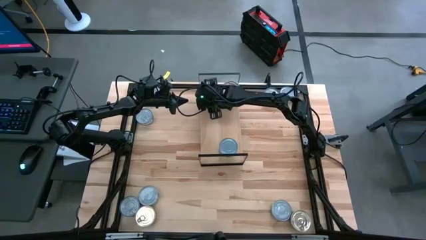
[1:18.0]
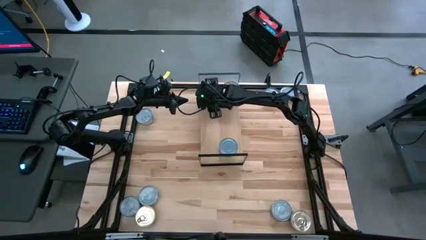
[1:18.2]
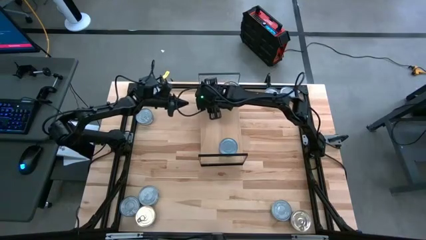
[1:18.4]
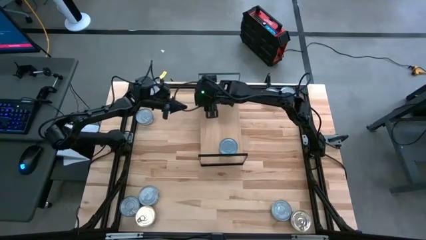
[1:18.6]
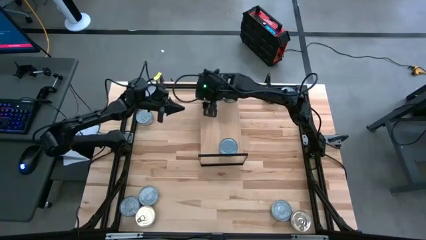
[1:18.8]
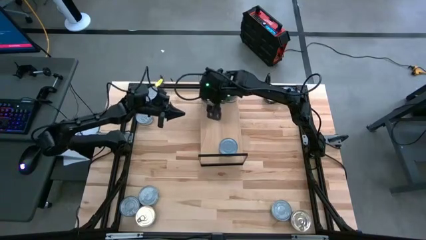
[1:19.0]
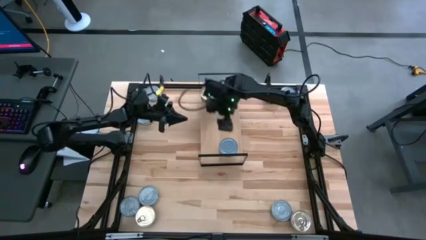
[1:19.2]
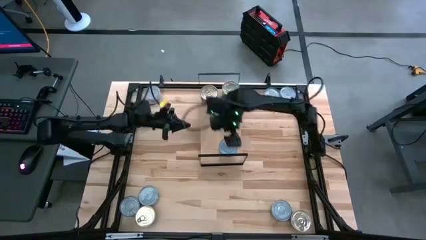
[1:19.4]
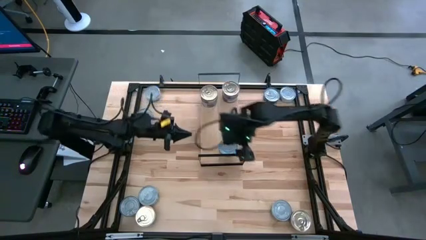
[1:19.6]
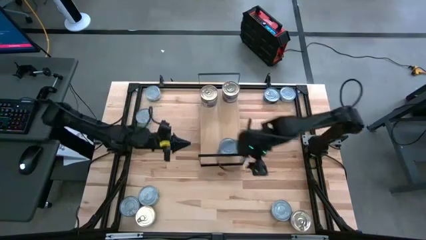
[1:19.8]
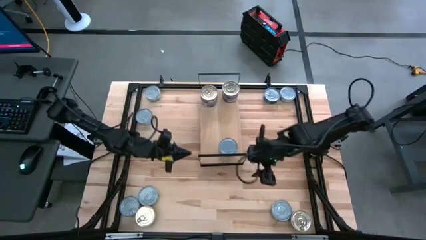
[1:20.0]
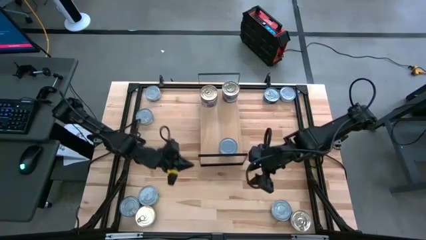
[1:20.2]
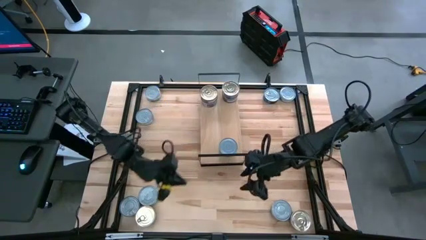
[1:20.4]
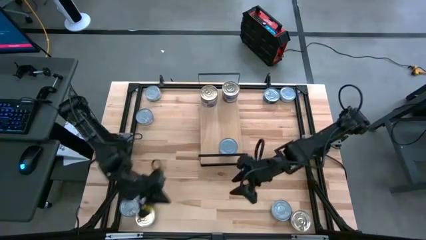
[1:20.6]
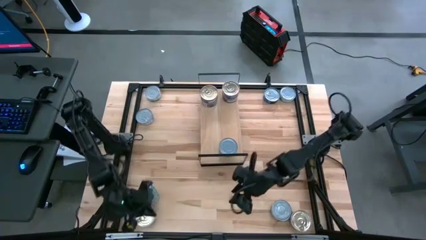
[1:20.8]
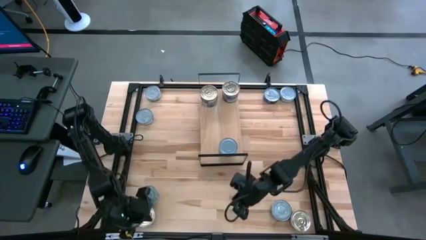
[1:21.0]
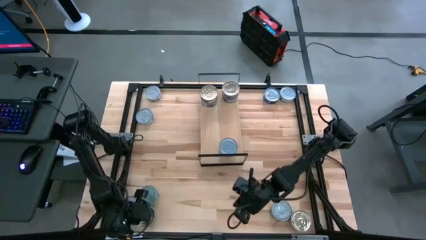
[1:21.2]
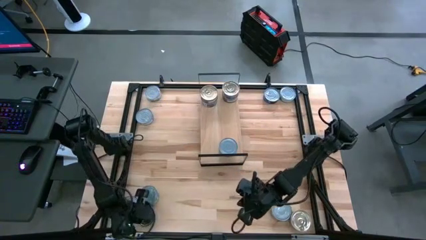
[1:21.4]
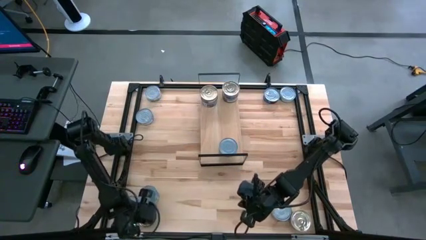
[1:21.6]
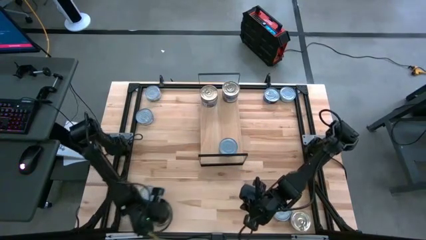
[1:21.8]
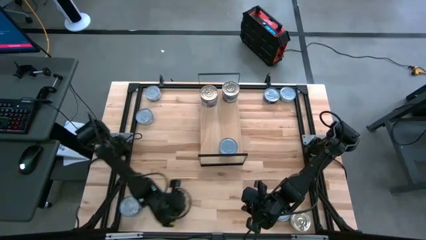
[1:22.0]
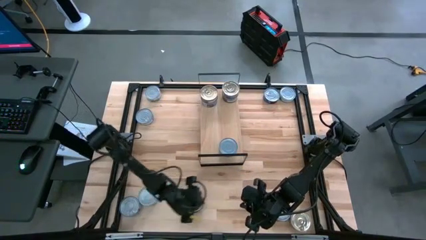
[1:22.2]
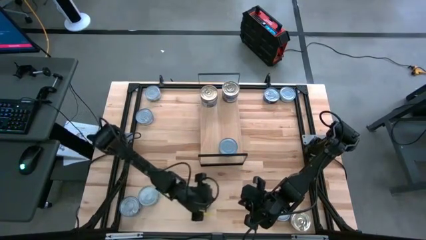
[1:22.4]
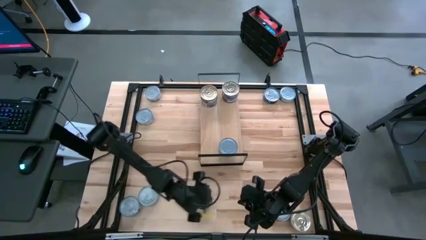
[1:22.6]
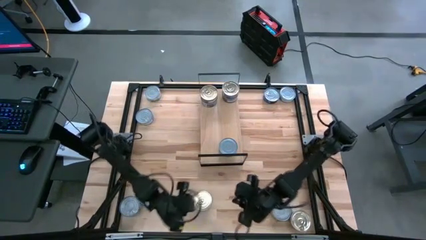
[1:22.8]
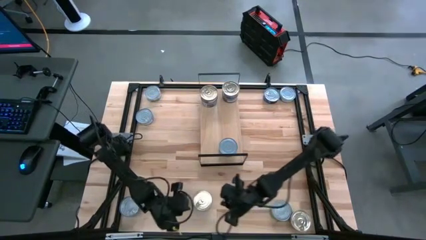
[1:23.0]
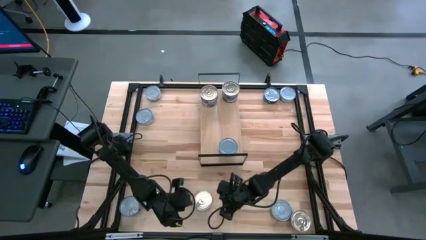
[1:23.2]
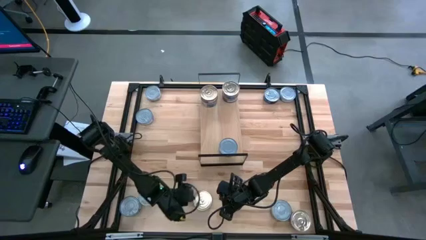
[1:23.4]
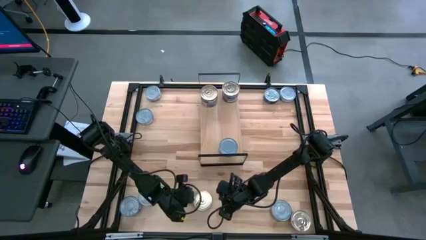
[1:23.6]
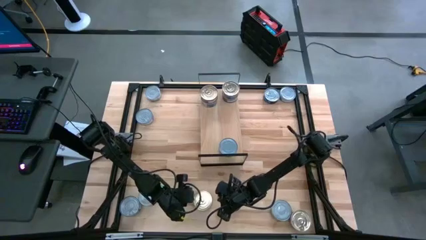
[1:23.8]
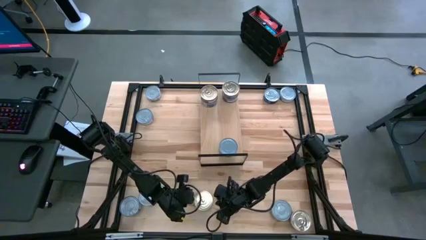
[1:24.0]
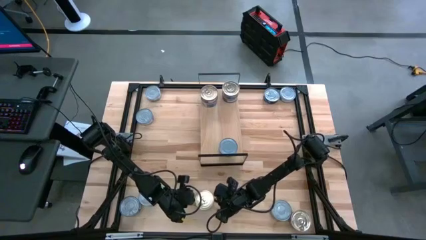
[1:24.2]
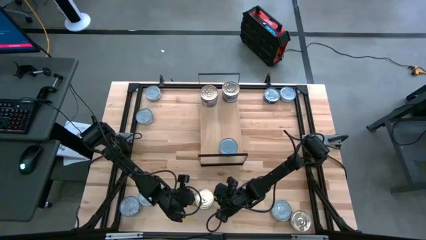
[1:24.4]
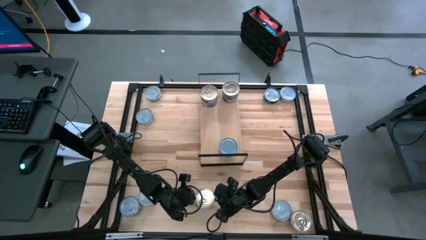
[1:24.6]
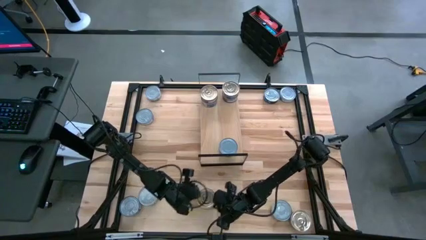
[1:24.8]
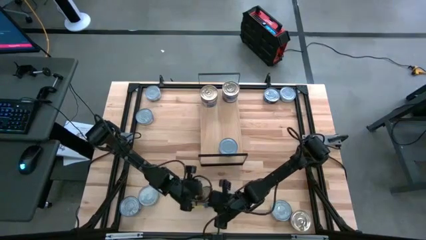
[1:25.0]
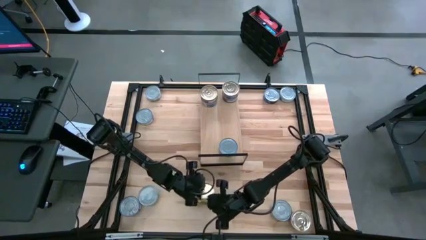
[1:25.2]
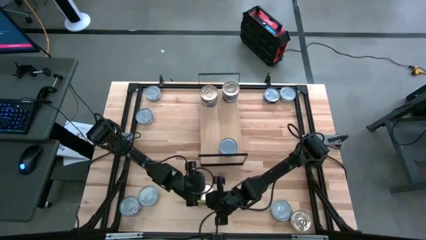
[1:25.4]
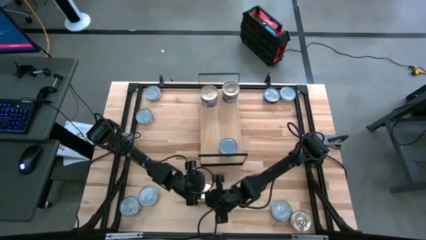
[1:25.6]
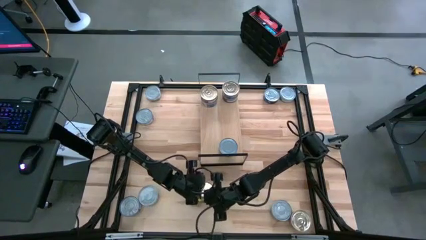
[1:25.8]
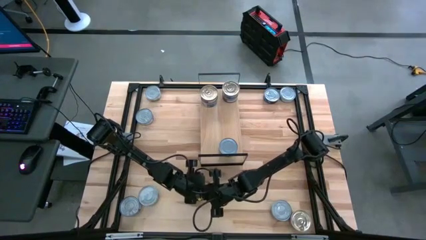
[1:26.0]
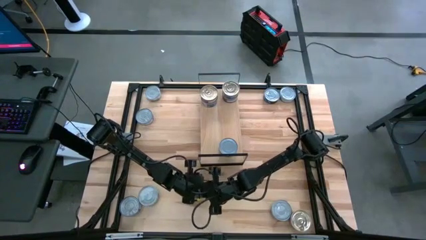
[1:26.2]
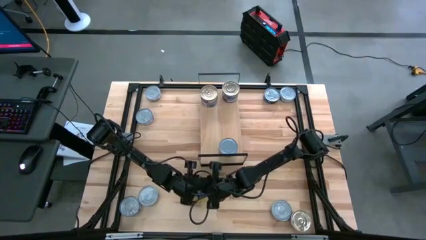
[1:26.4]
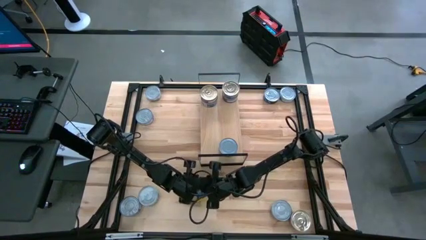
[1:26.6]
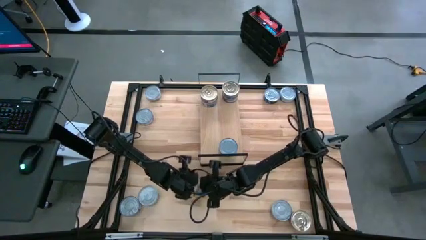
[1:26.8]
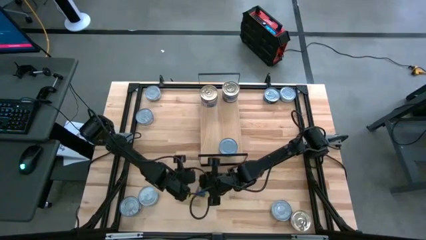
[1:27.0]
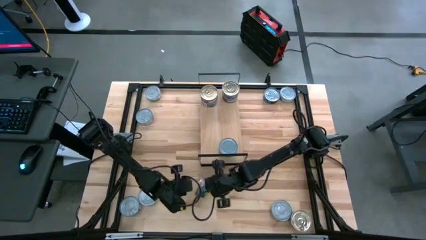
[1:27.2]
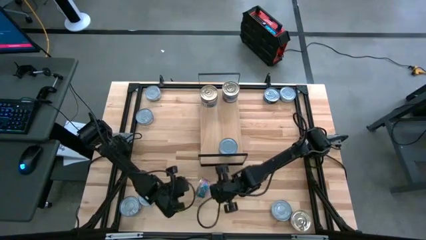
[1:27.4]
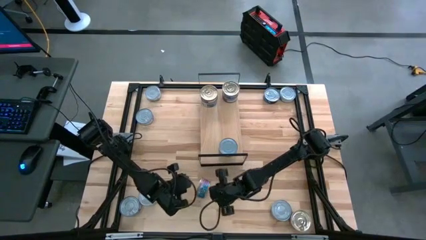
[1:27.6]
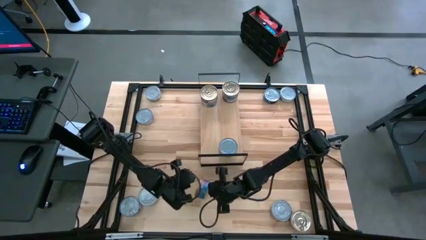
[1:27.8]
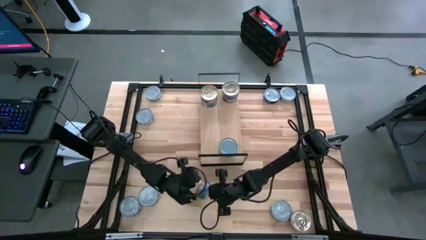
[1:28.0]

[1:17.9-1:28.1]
Task: Stack canned seafood by type on shelf
Stack the blue pink tuna can on top of the other blue pink tuna cans on the shelf
